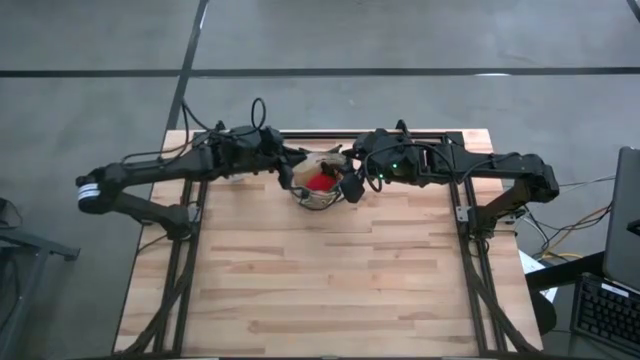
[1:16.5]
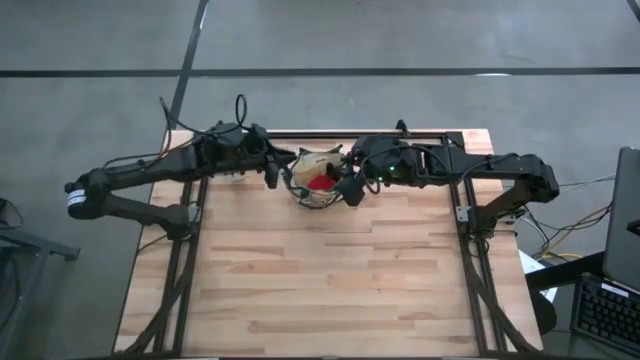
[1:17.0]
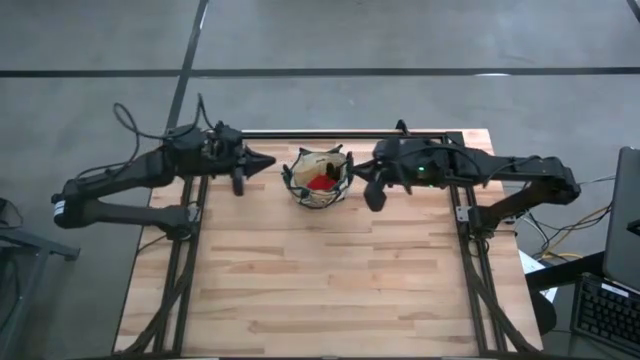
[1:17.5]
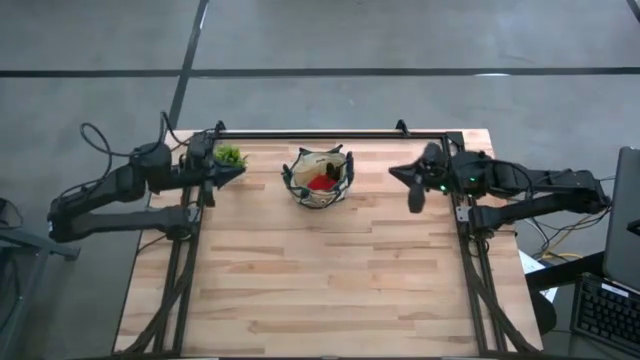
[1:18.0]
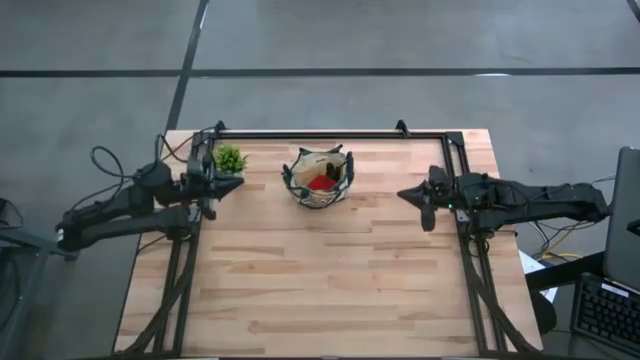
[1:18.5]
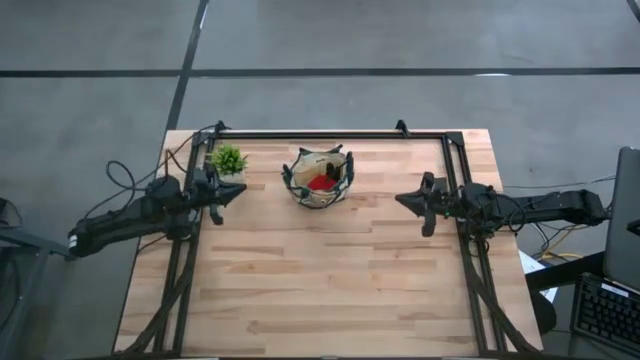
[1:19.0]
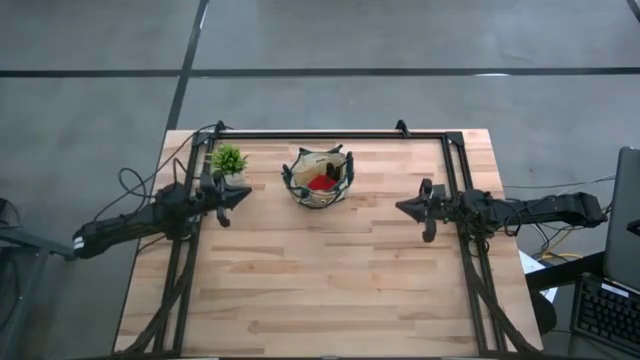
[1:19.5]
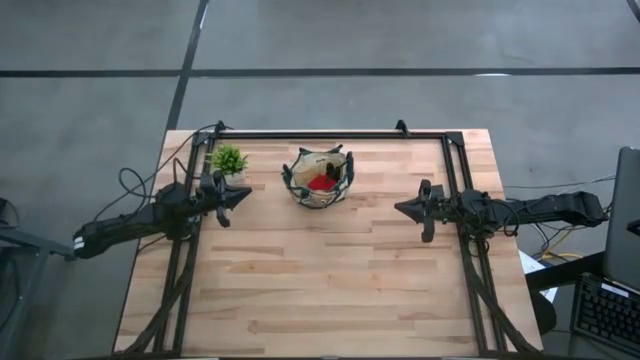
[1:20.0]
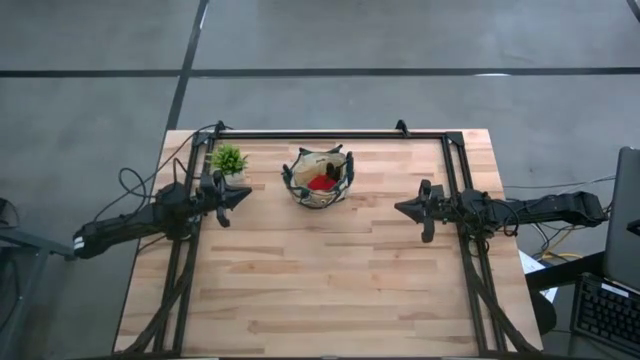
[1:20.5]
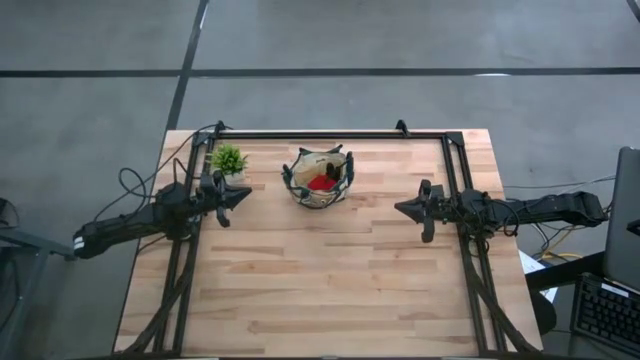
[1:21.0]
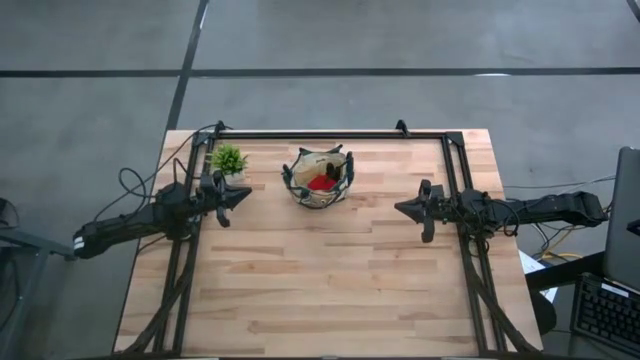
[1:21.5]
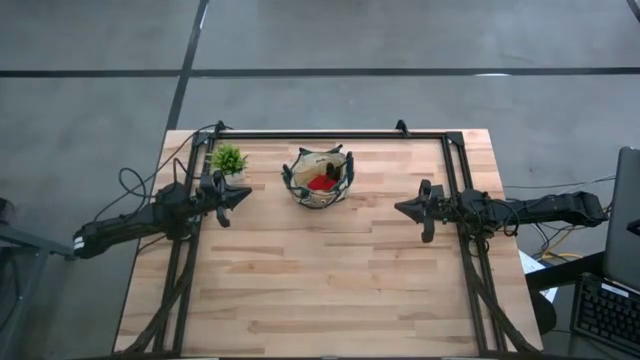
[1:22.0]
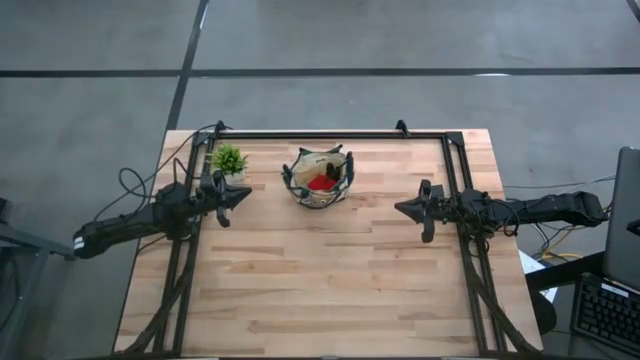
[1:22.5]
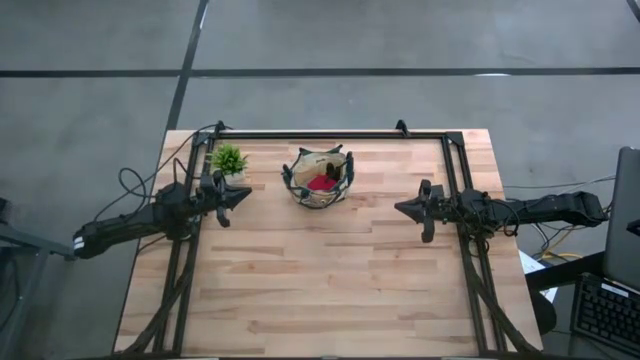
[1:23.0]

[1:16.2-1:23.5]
Task: Pick & Place Garden tools in Gardening bag
Return to Home Position

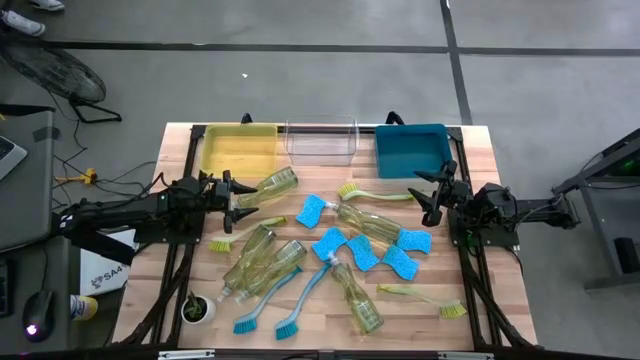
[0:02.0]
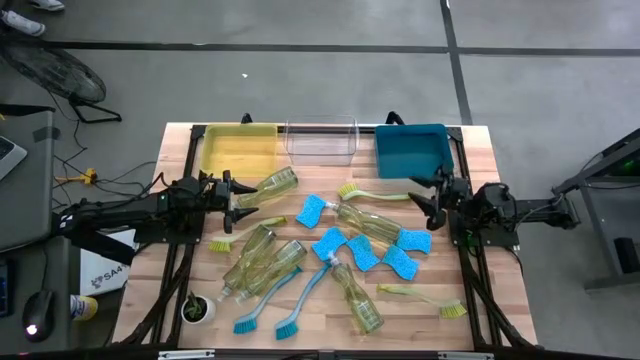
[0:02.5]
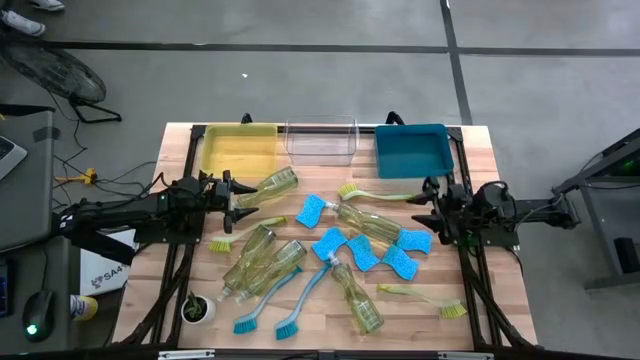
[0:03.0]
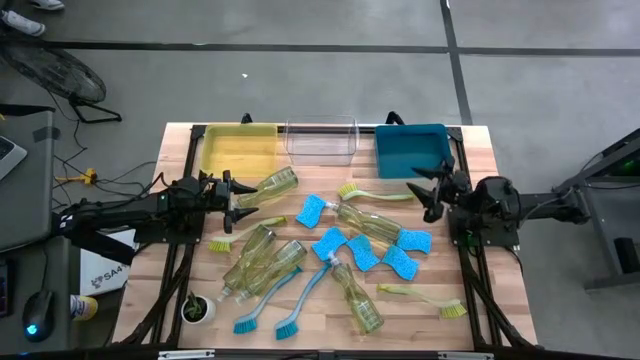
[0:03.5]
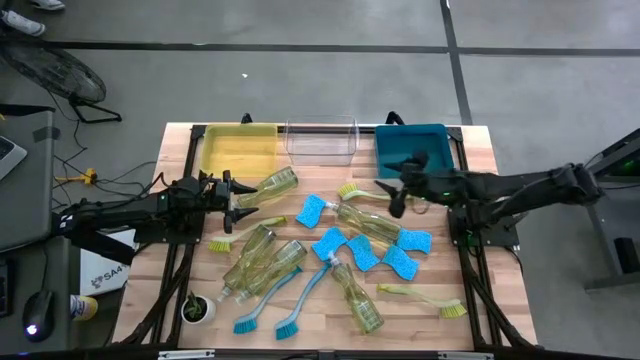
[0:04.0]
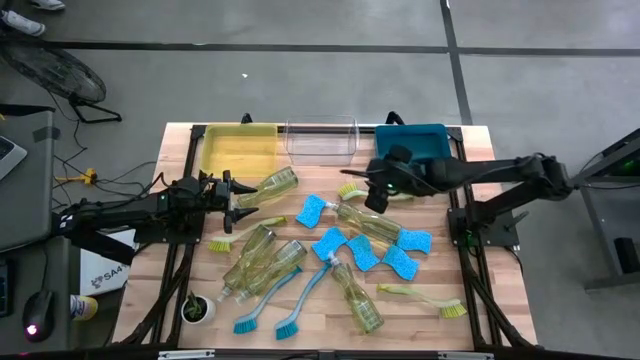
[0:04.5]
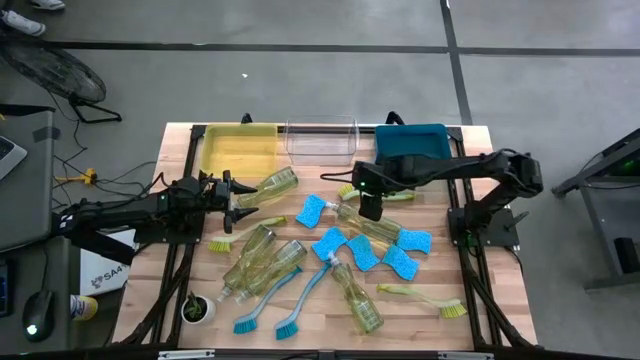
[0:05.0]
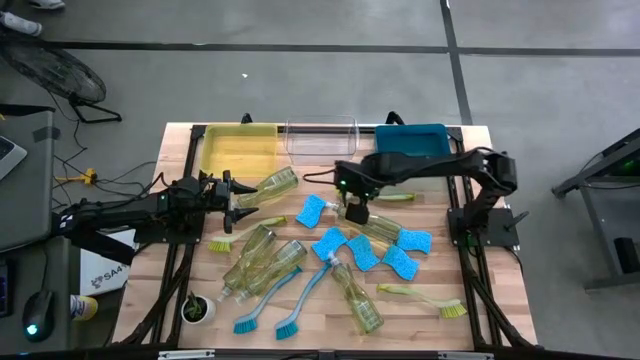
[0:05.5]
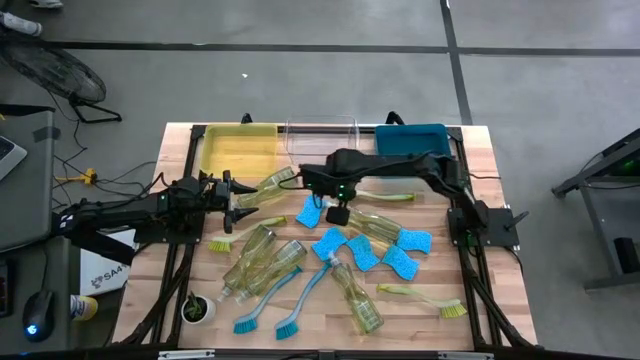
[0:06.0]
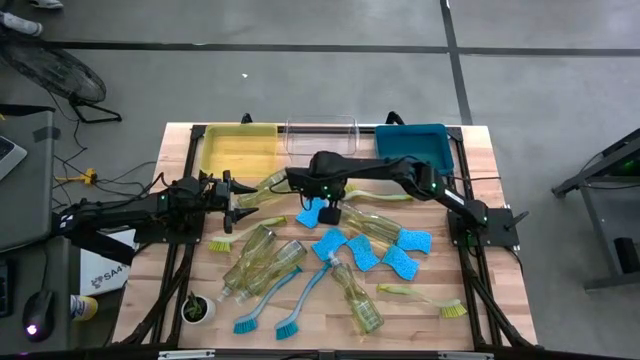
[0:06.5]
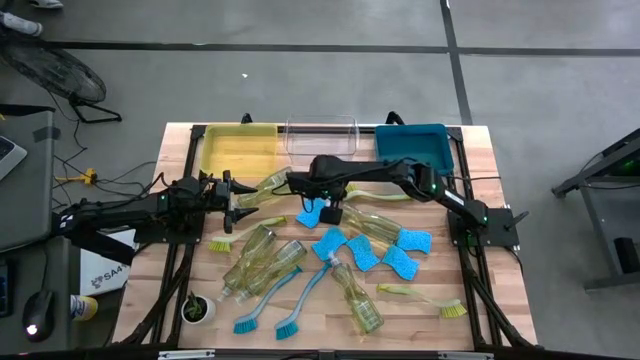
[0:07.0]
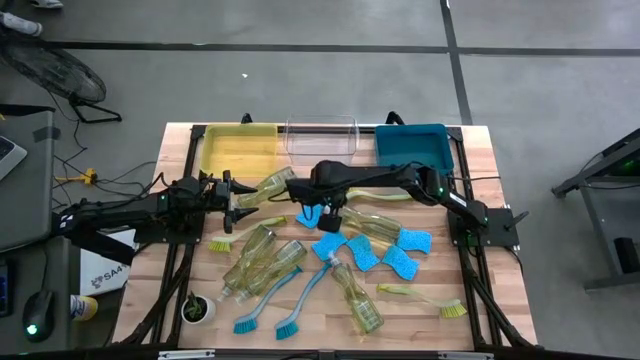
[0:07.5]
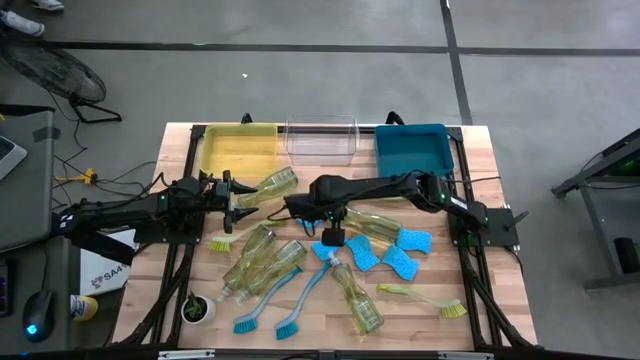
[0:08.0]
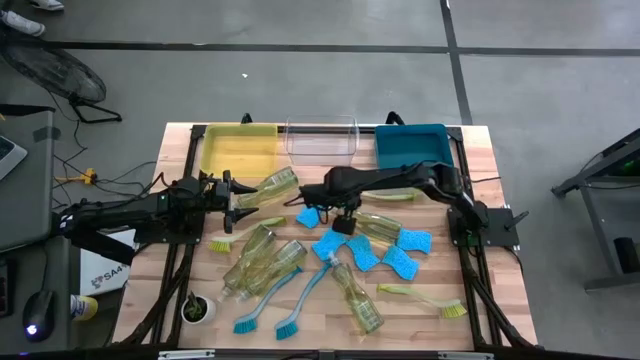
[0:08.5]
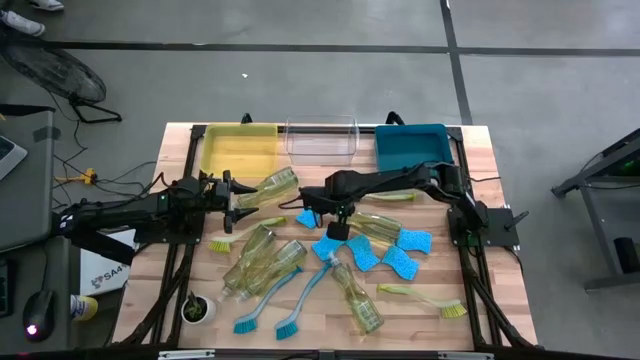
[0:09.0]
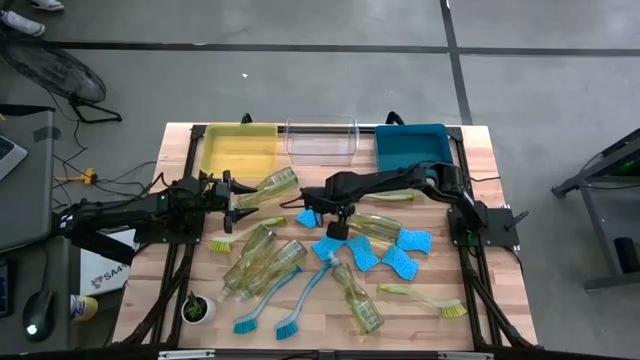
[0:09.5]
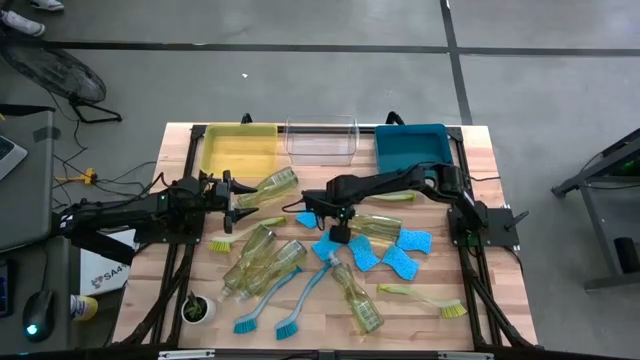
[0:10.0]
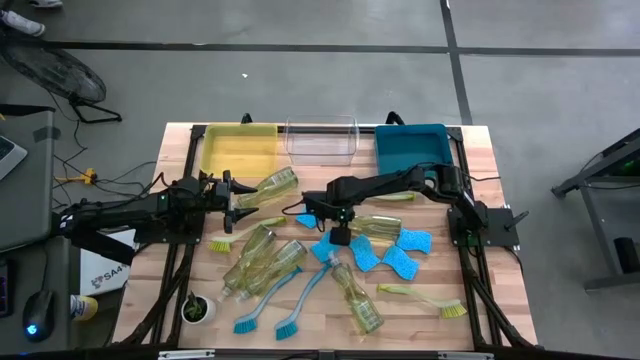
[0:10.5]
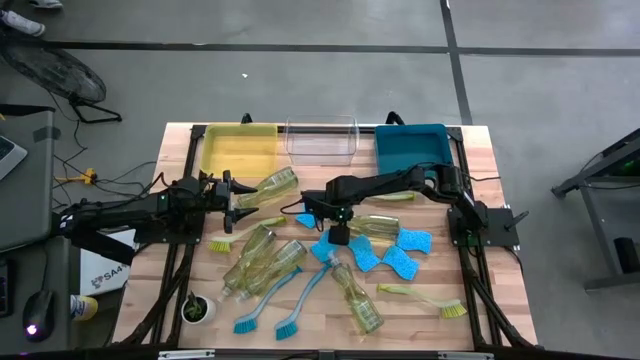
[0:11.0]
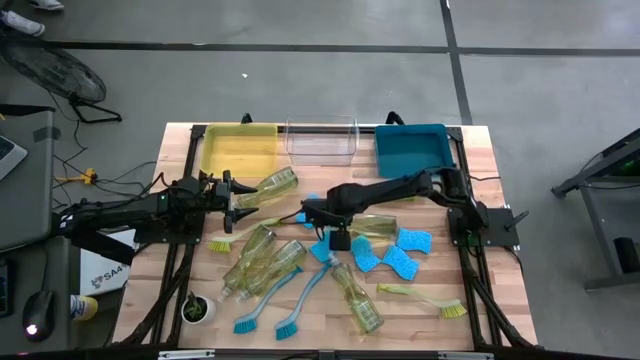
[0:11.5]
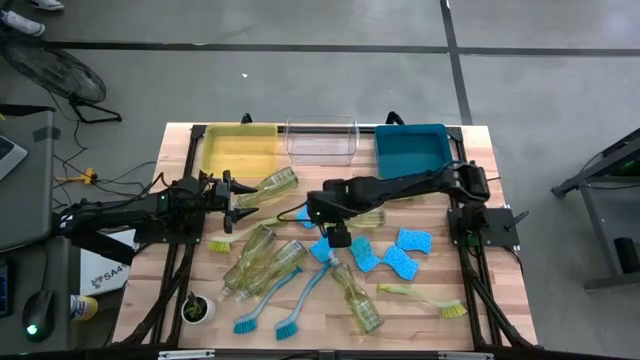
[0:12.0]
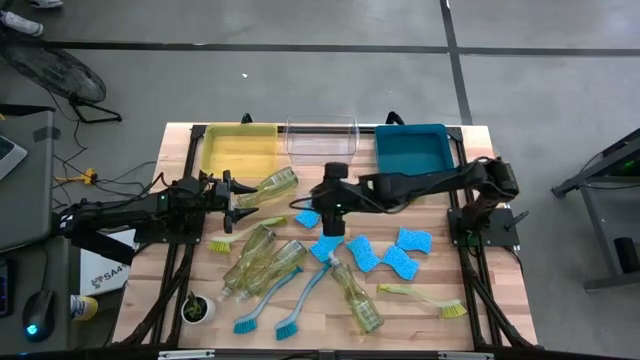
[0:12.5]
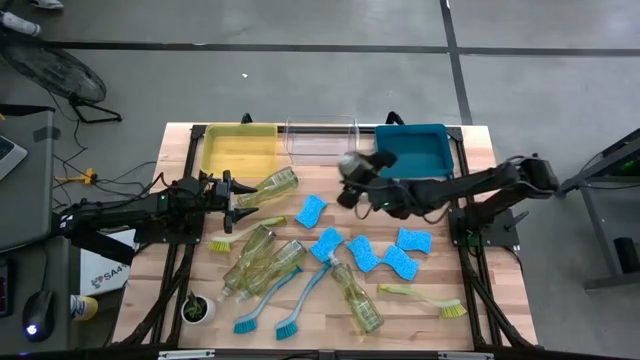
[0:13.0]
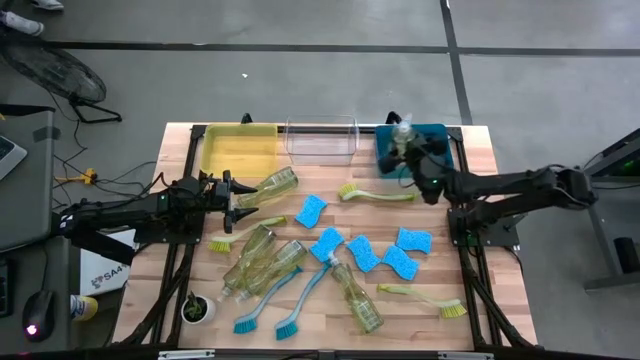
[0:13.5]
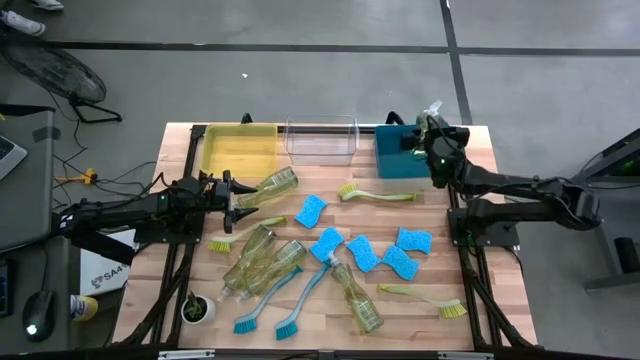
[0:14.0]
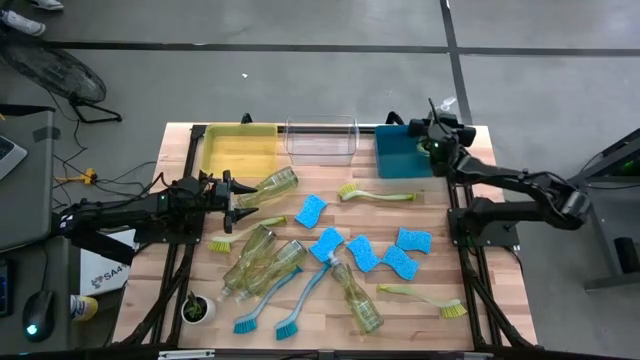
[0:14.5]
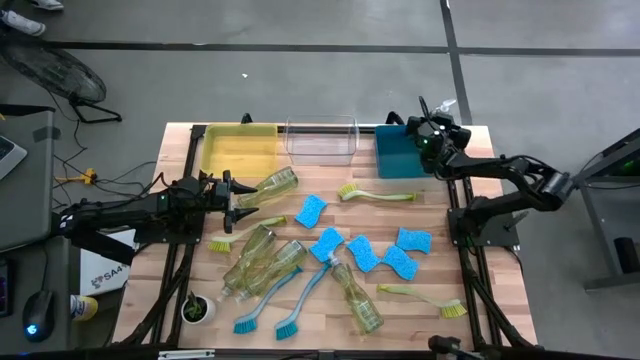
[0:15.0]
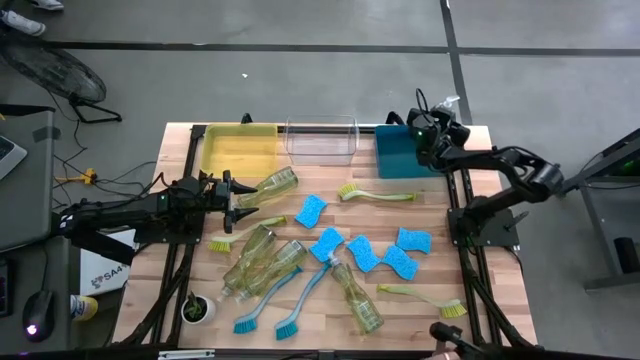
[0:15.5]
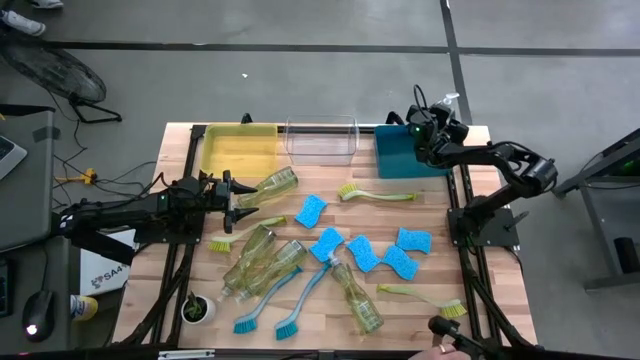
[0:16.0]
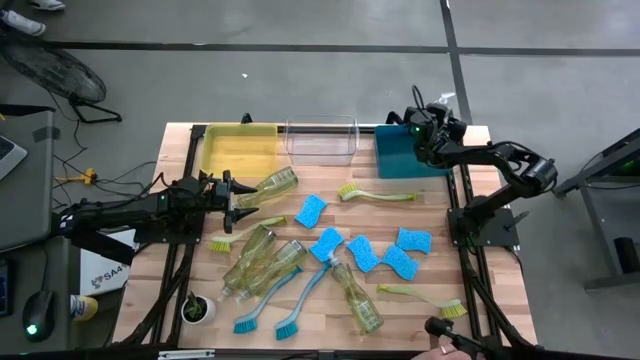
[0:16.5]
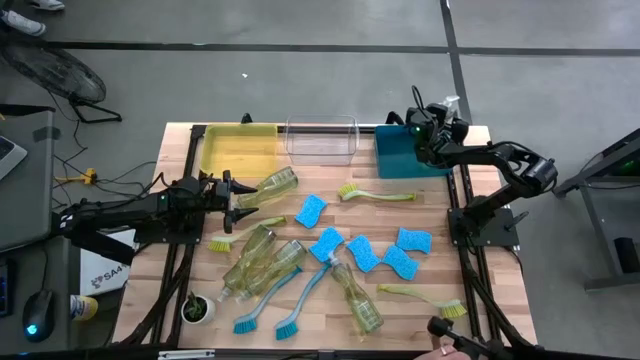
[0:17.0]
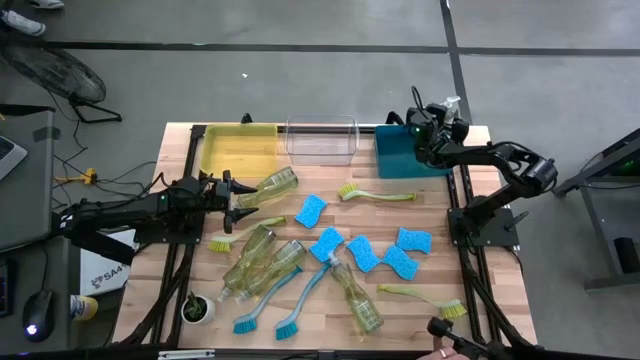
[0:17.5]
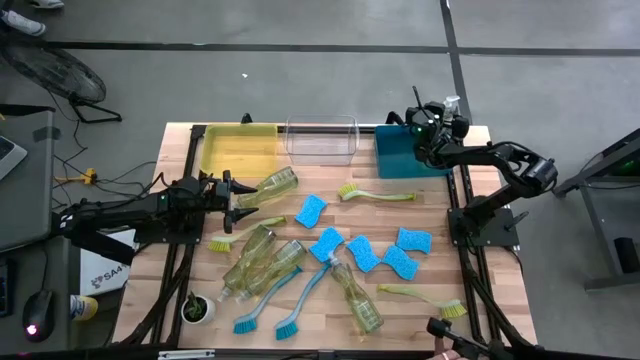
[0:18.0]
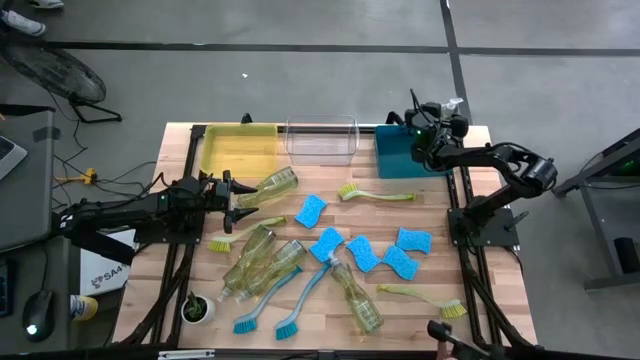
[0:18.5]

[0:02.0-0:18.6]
Task: Pick & Place Kitchen Sink Supplies
Put the dish soap into the blue bin
